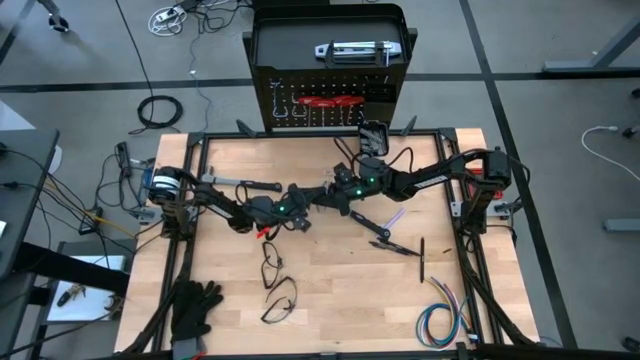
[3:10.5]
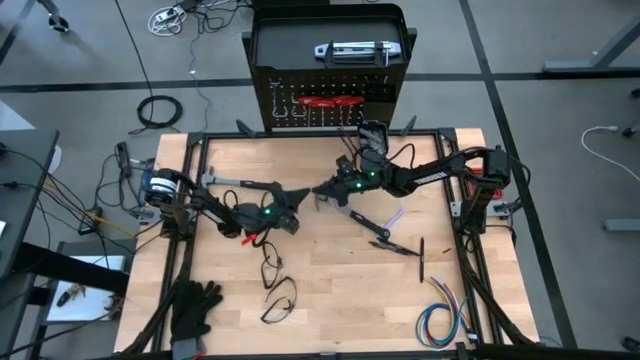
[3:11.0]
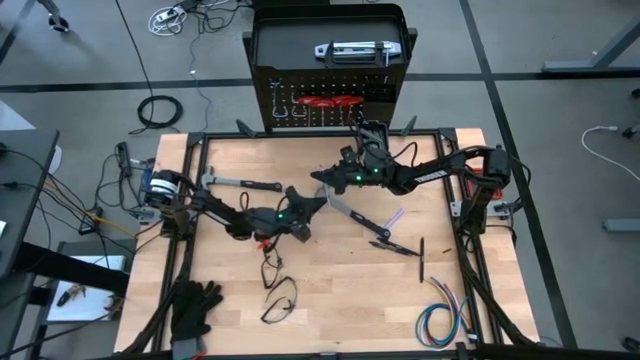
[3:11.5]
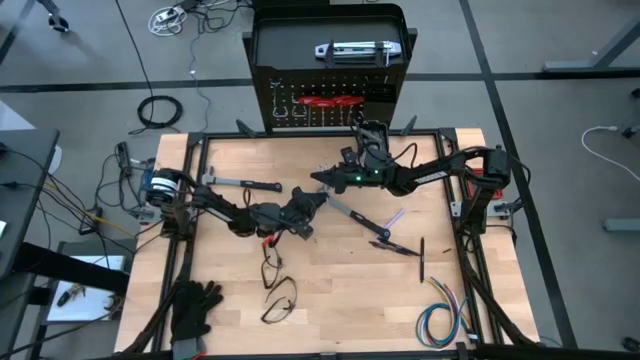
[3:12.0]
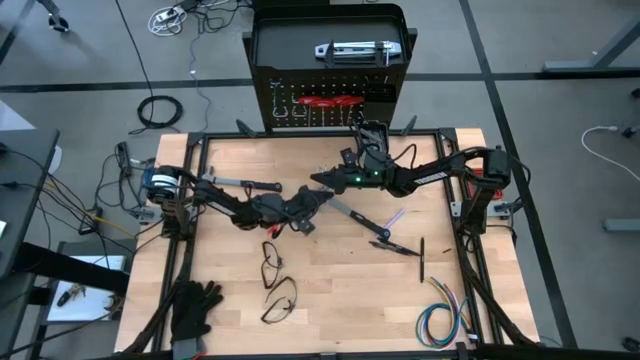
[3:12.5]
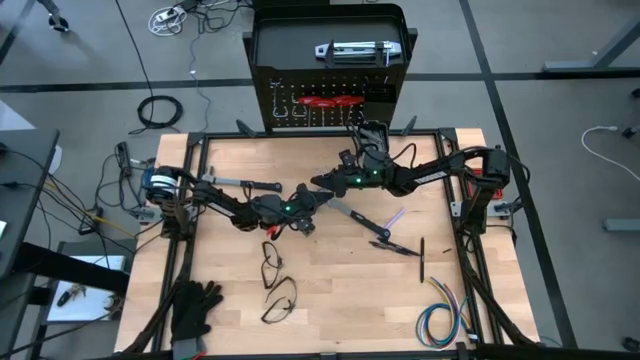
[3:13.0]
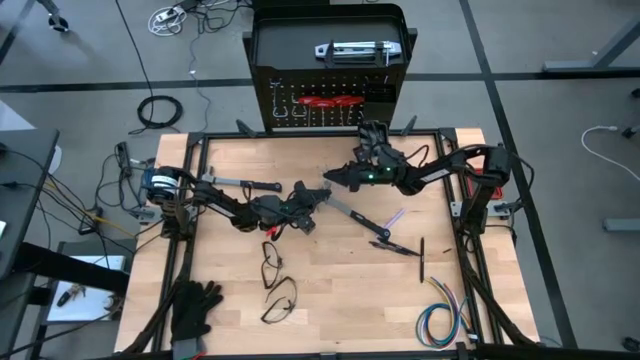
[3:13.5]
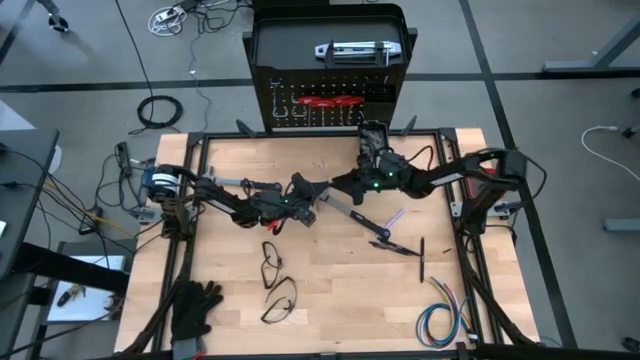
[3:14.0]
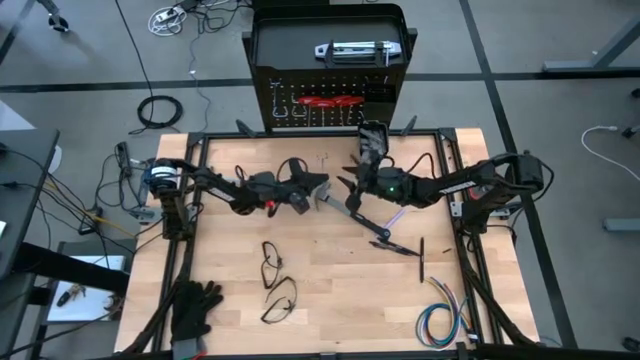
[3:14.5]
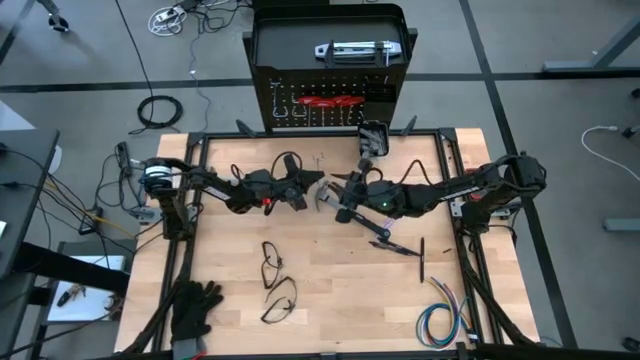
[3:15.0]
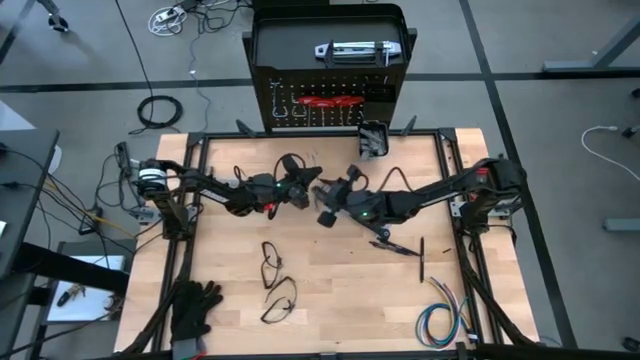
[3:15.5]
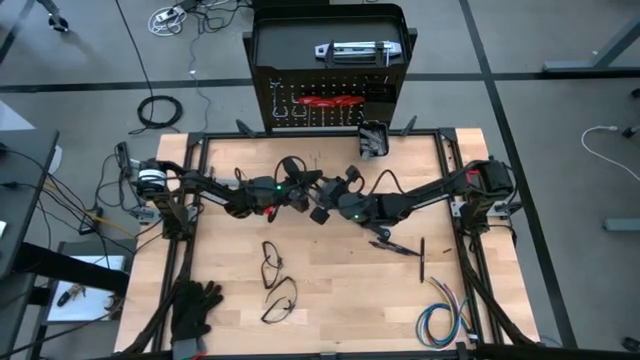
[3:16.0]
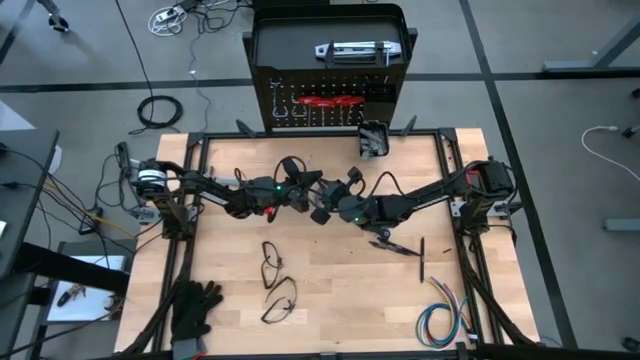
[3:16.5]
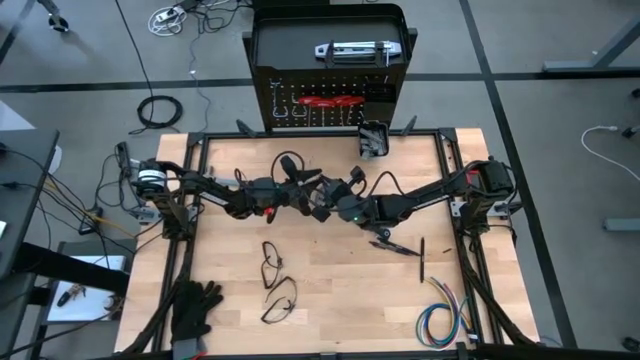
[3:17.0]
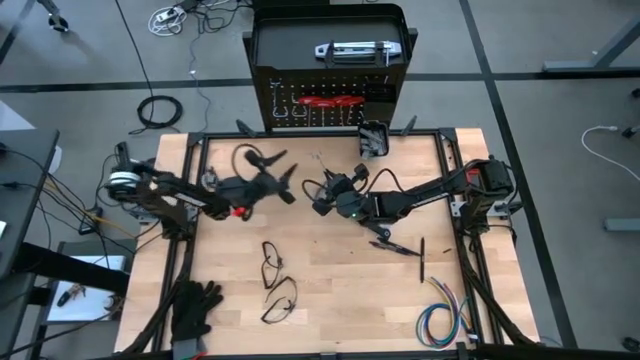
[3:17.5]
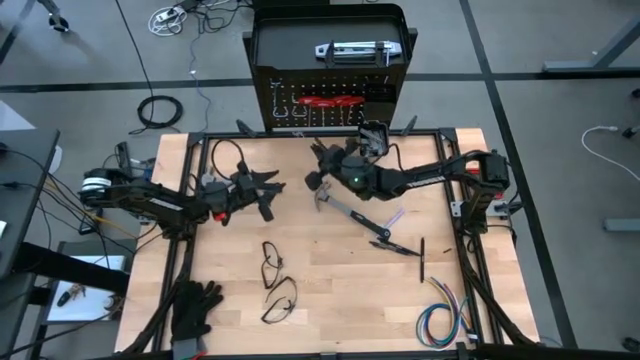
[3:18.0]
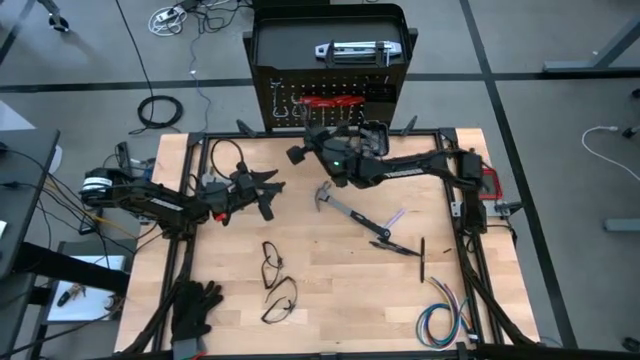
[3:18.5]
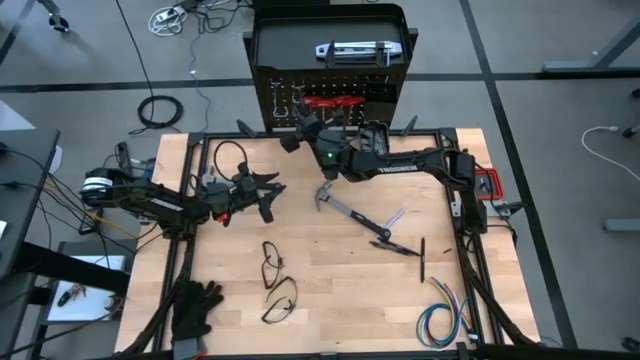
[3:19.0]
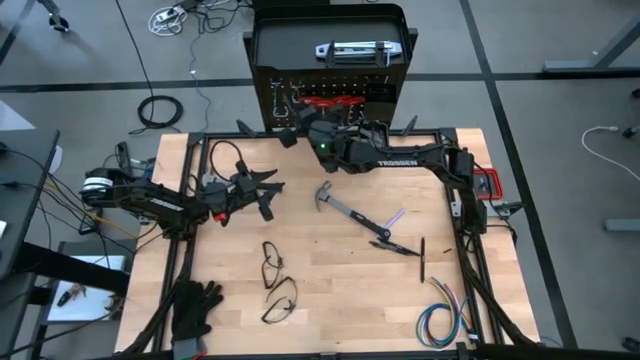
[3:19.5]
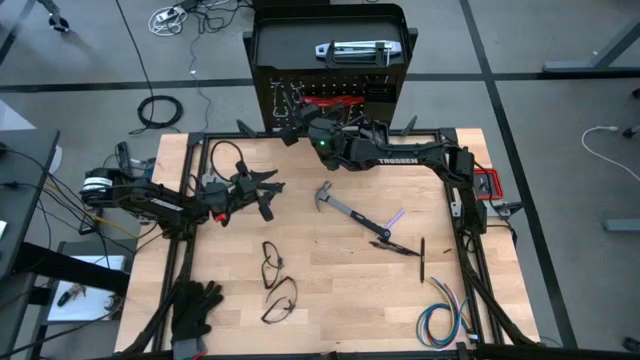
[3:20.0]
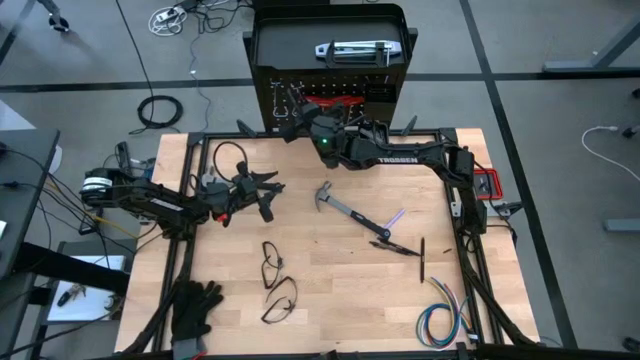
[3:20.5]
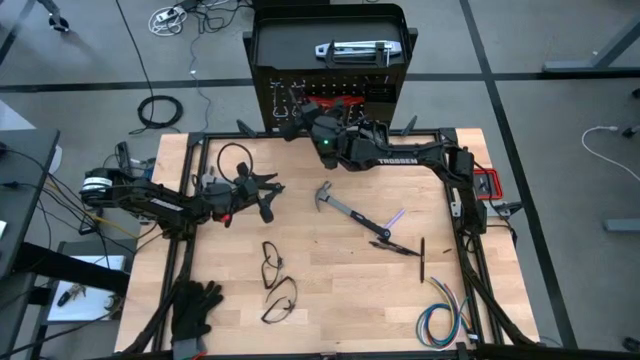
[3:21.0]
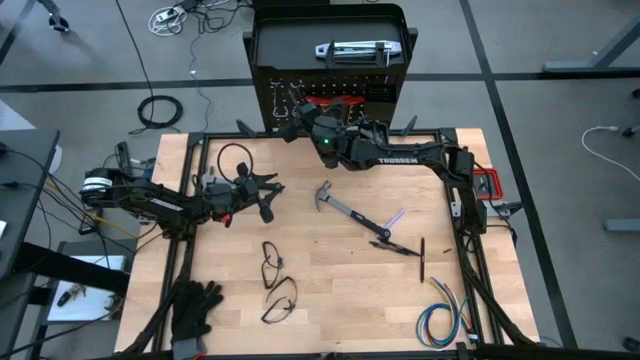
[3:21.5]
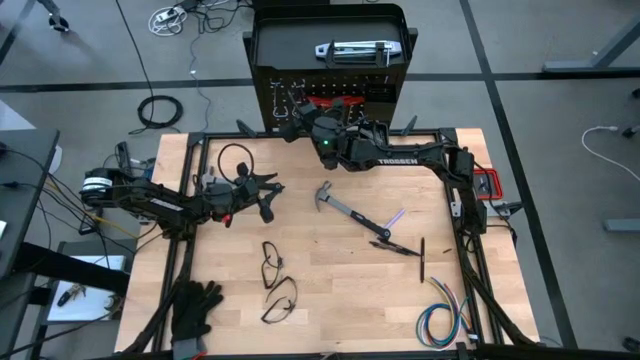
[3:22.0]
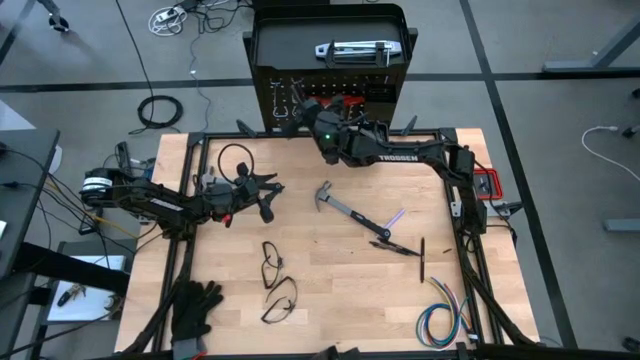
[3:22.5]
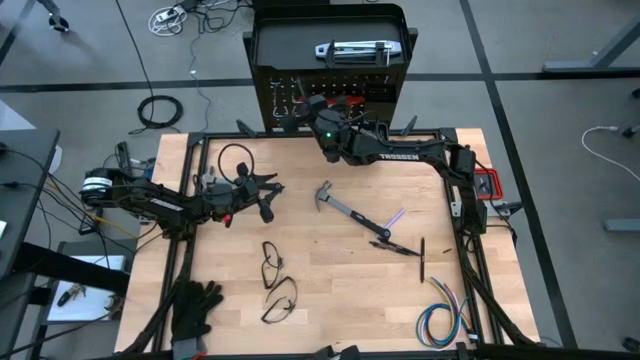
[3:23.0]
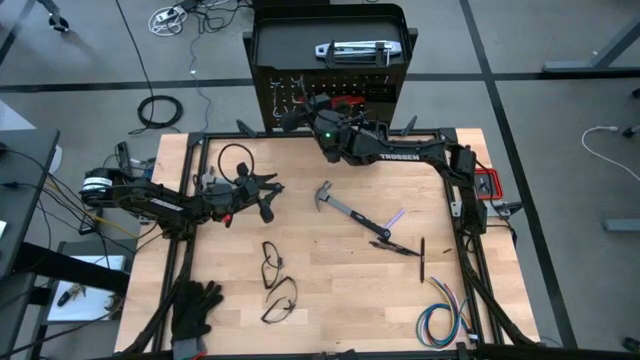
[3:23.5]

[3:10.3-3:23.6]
Task: Hang tools onto peg board
Hang the hook on the pegboard

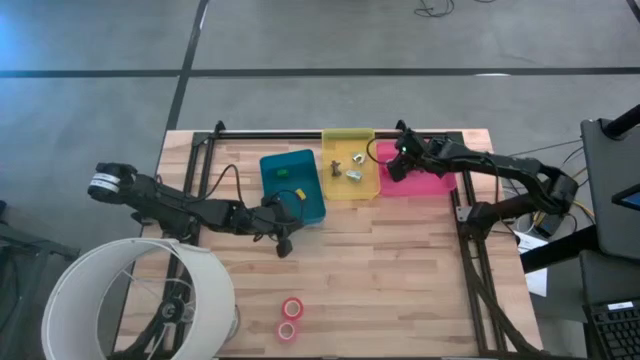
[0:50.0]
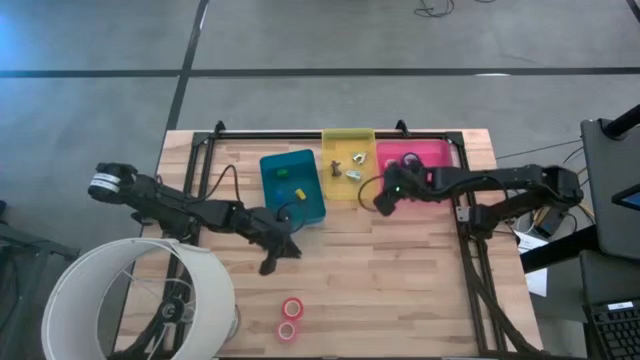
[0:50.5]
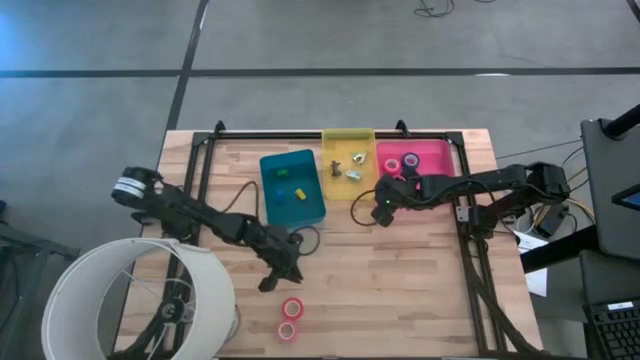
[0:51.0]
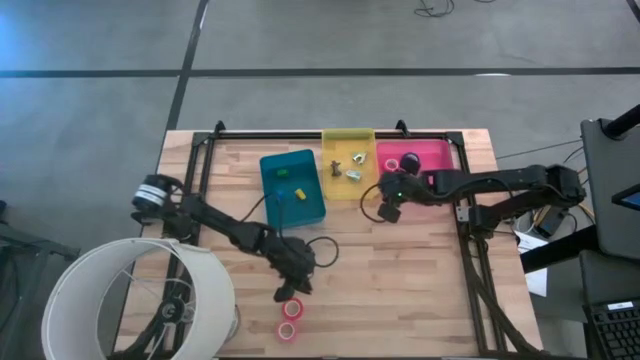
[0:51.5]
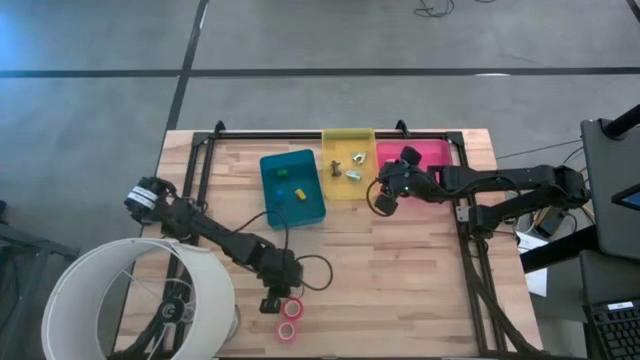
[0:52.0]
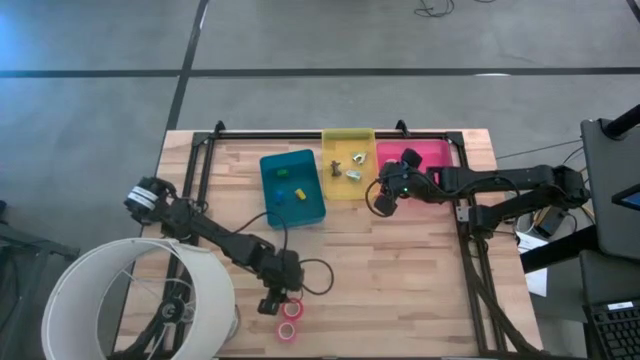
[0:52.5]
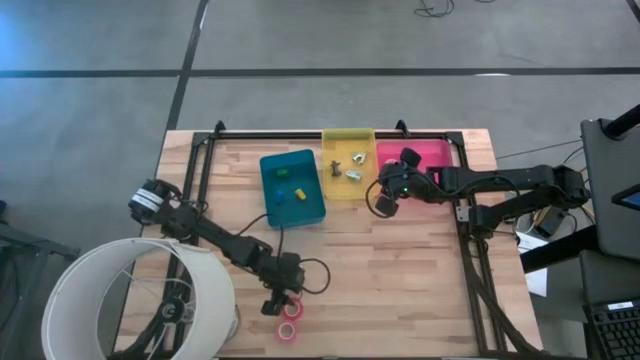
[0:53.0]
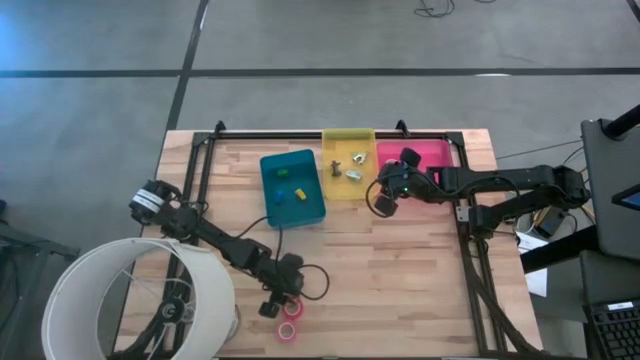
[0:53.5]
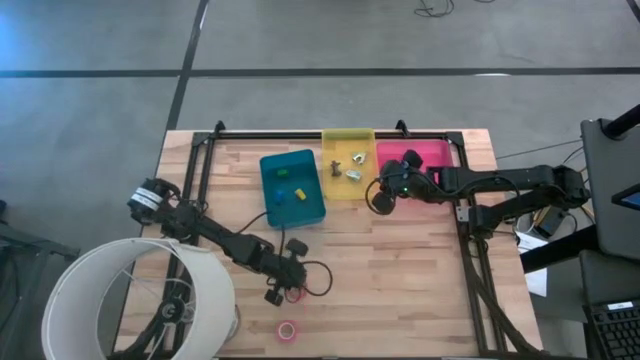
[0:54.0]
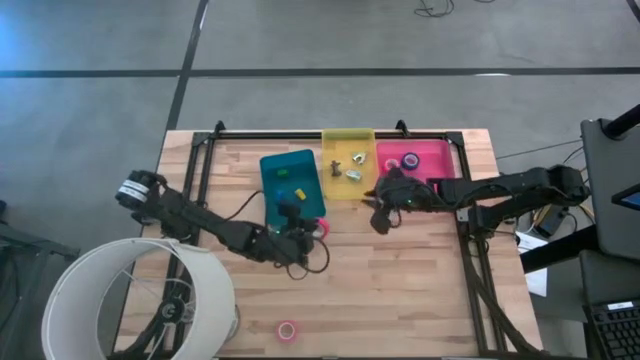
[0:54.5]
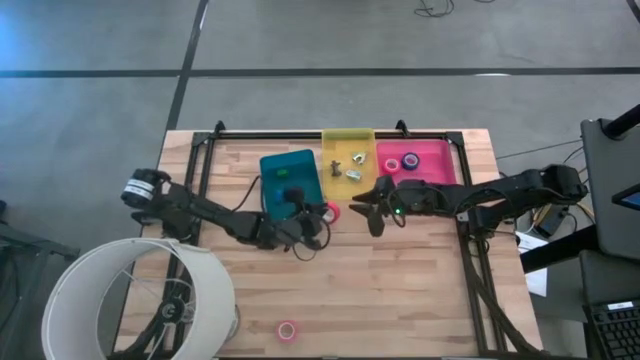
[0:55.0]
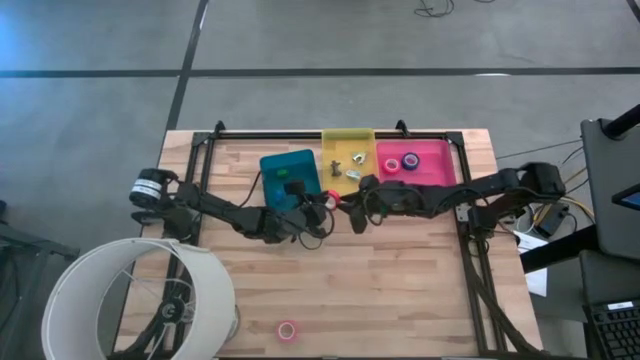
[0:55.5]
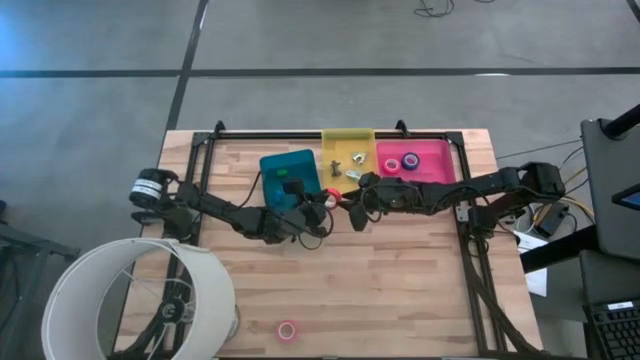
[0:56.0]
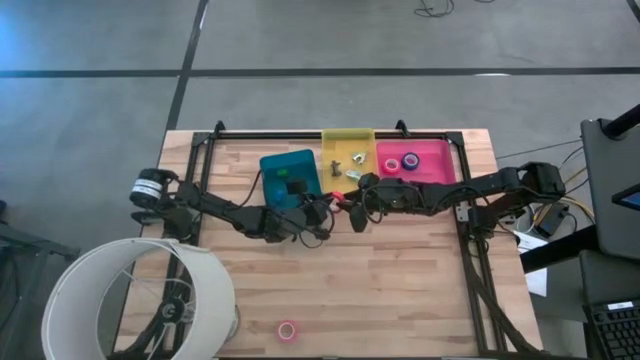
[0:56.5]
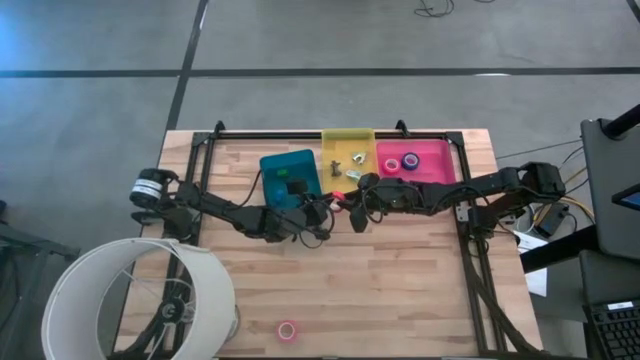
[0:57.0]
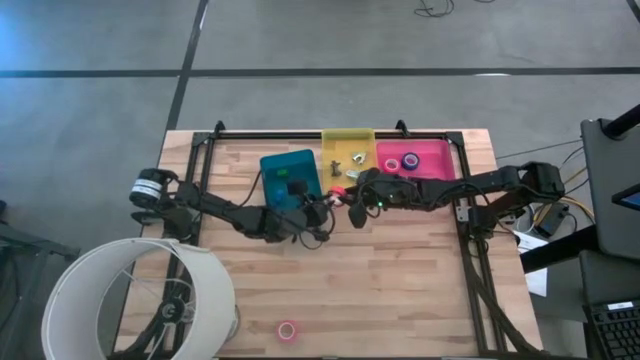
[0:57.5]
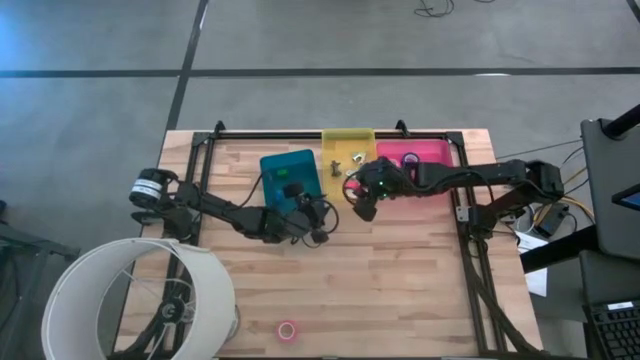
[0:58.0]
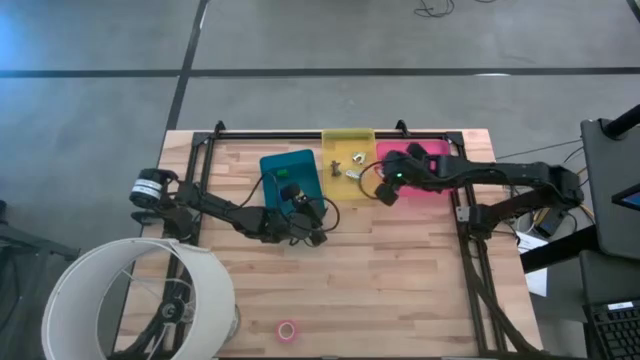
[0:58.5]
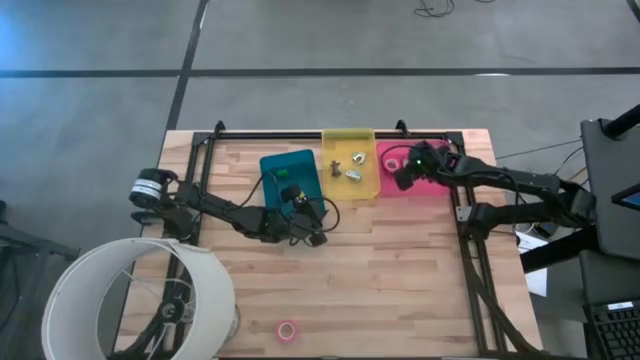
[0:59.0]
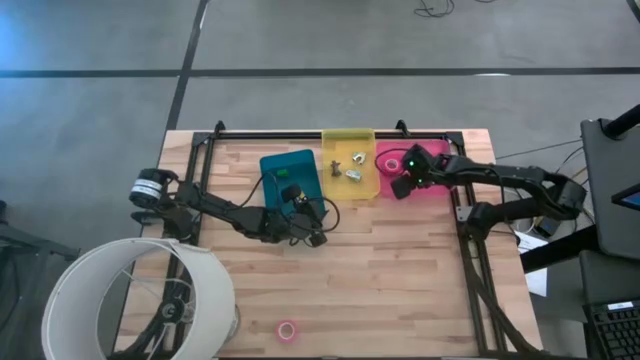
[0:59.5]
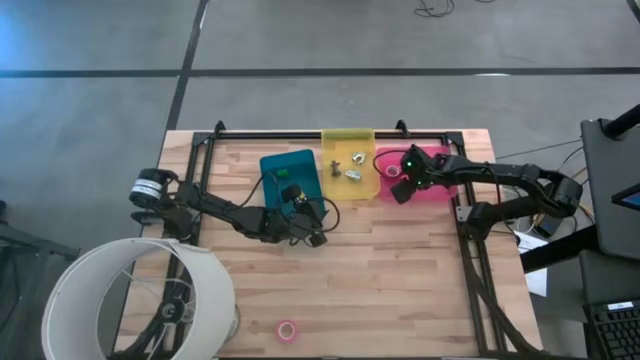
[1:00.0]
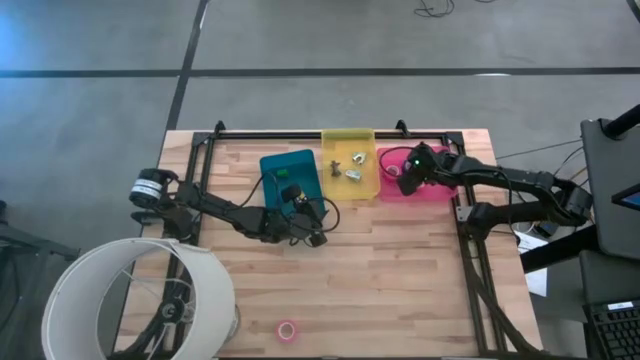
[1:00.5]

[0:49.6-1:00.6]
Task: Pick and place Stapler, Stapler remover, tape
Put the red tape into the red bin
